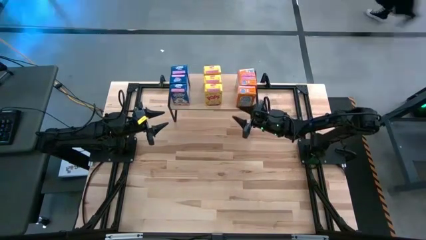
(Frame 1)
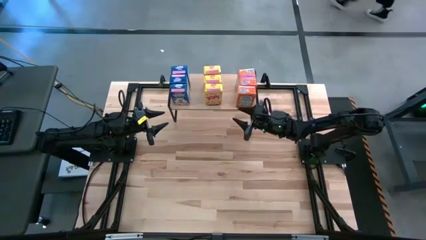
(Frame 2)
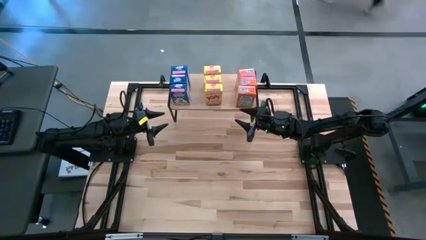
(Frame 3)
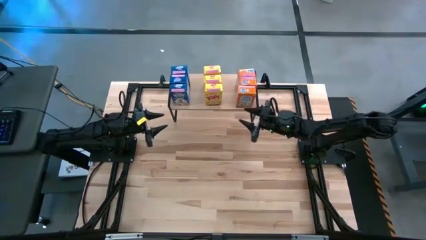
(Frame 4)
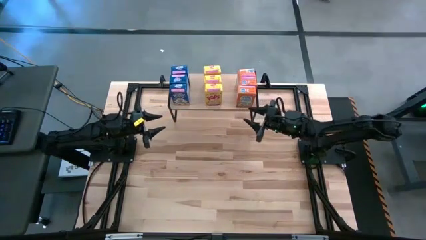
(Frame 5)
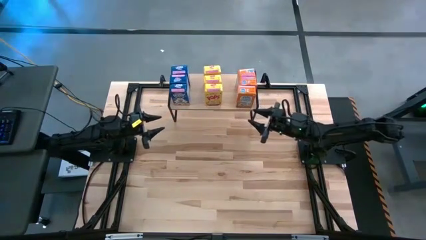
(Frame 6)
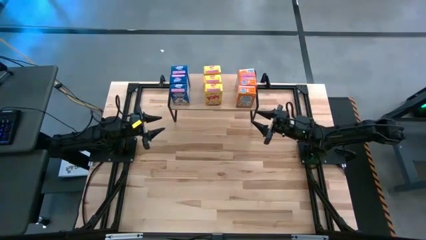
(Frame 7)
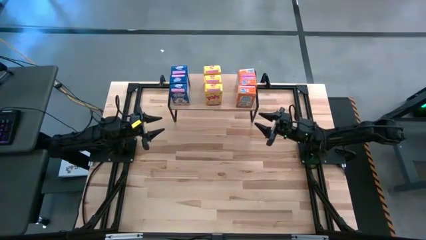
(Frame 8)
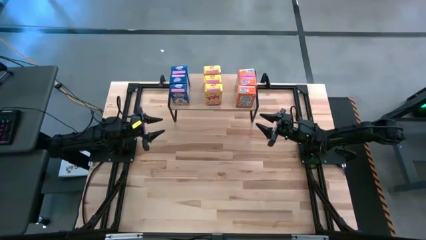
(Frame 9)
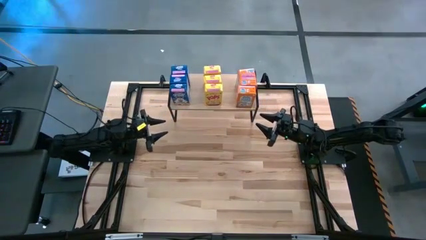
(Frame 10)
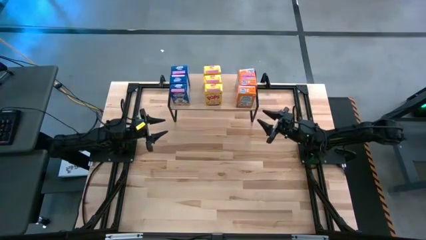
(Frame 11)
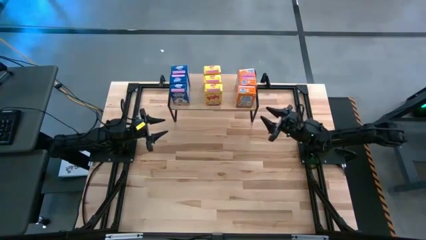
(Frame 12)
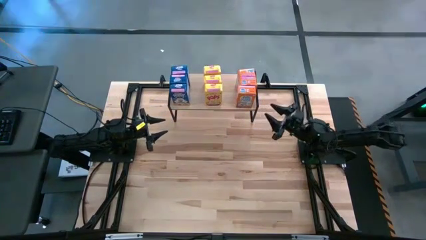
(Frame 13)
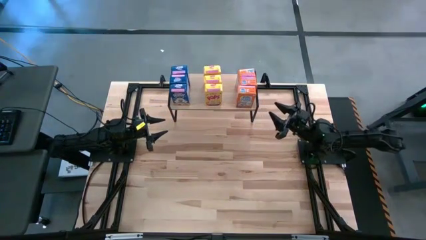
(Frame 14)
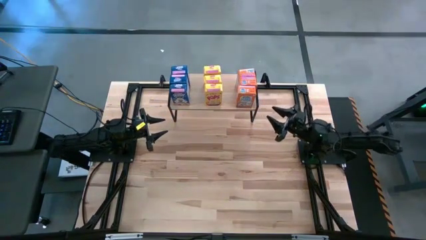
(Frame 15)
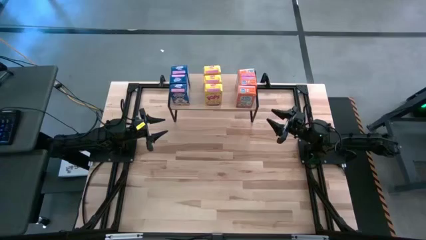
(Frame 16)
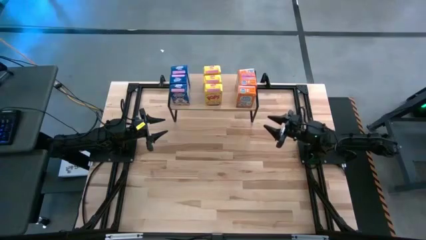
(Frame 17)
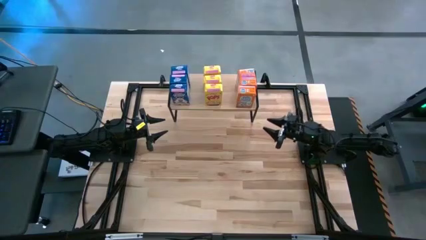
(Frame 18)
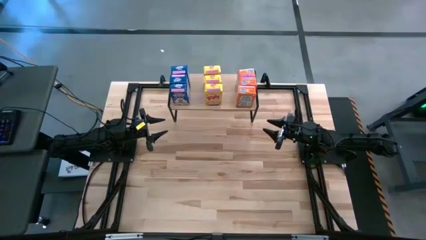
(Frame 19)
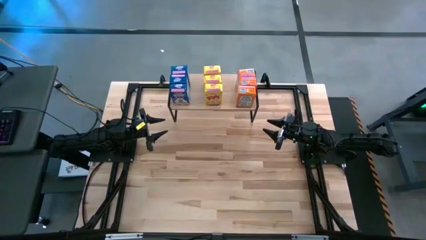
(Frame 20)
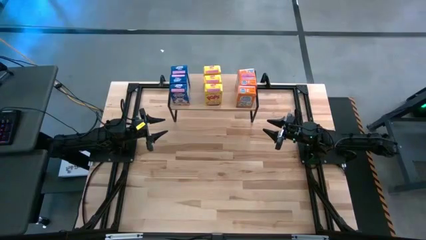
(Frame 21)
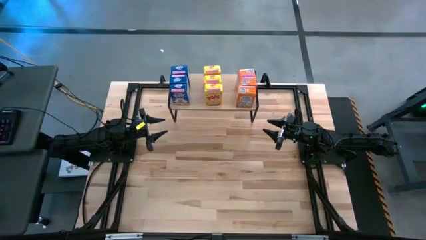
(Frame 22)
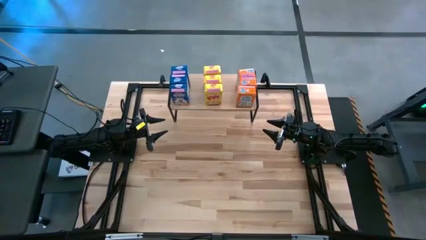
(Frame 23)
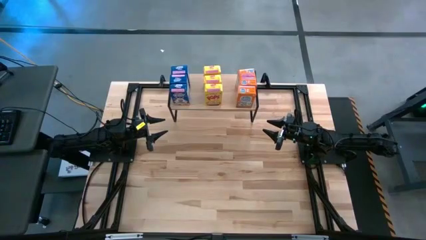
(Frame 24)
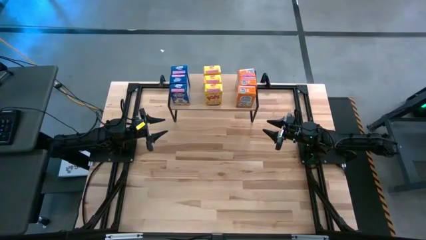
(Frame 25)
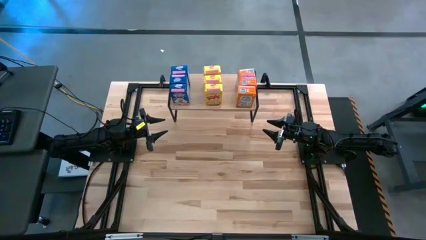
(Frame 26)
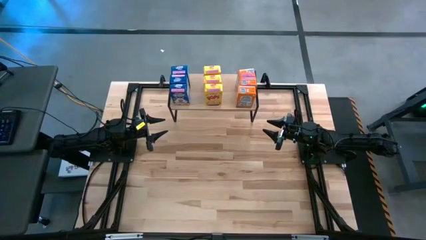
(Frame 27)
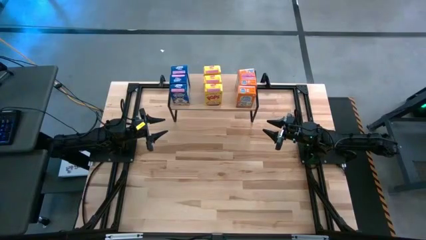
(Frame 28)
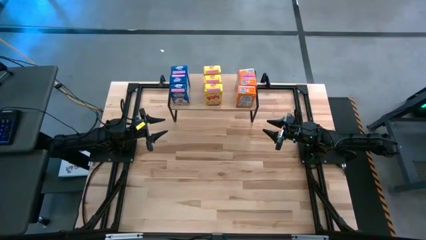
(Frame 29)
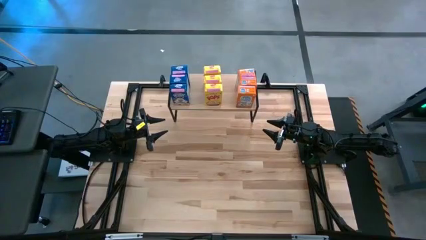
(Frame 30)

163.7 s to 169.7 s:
Task: Stack cereal on shelf
Return to Home Position

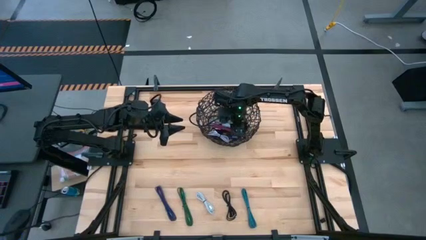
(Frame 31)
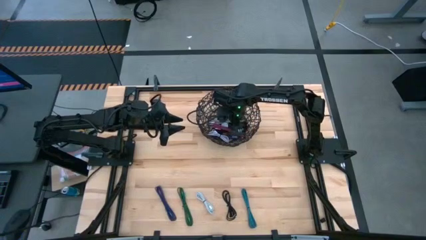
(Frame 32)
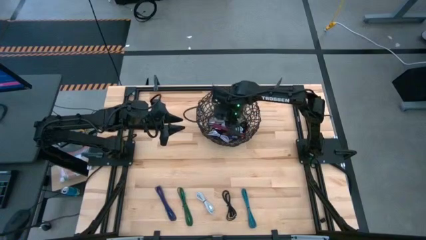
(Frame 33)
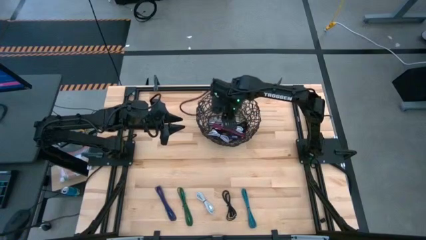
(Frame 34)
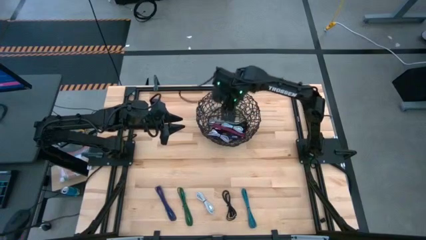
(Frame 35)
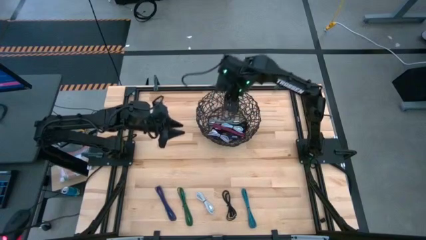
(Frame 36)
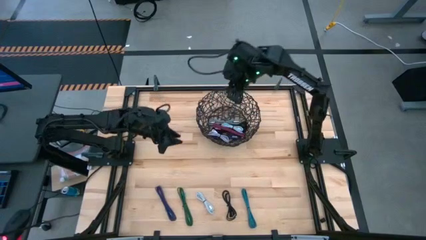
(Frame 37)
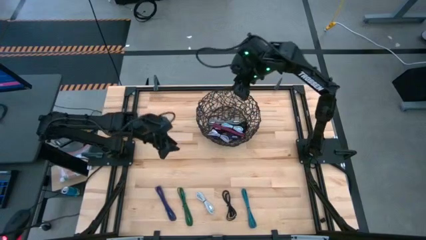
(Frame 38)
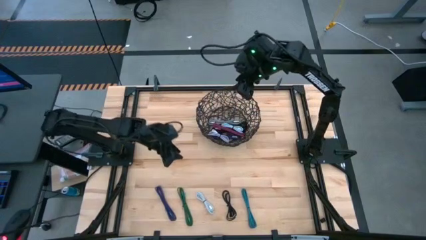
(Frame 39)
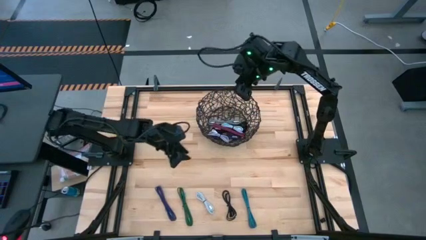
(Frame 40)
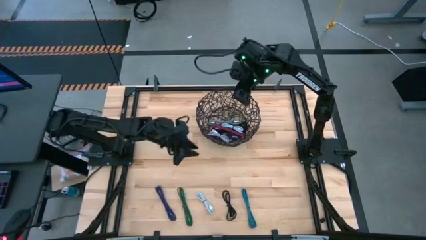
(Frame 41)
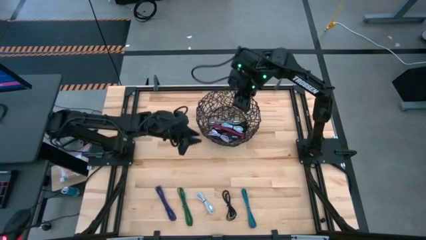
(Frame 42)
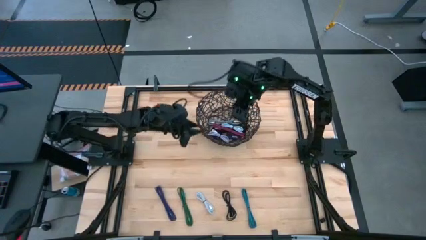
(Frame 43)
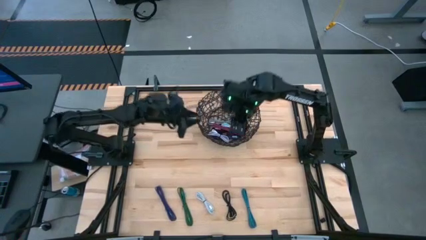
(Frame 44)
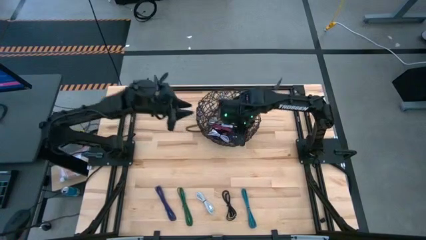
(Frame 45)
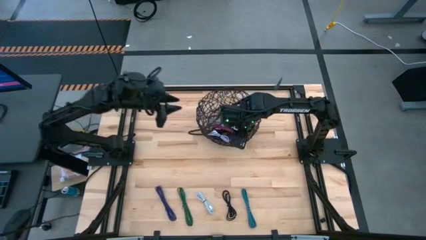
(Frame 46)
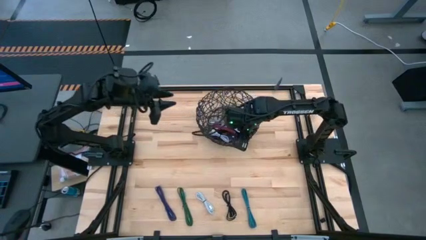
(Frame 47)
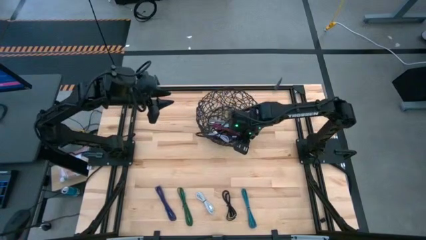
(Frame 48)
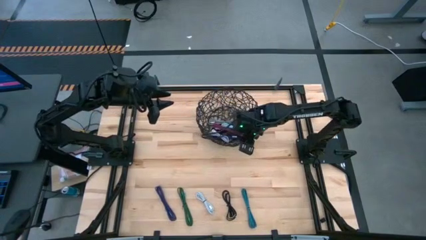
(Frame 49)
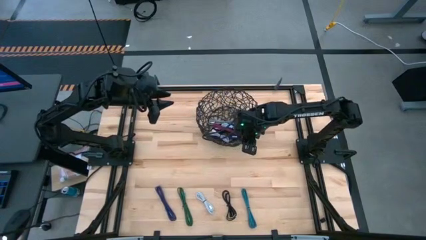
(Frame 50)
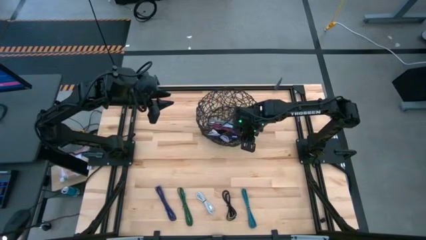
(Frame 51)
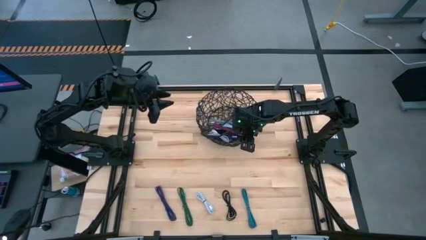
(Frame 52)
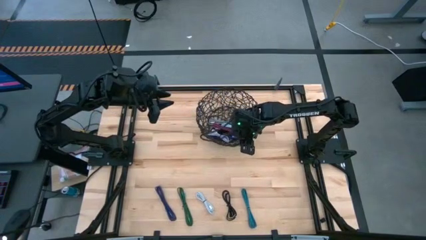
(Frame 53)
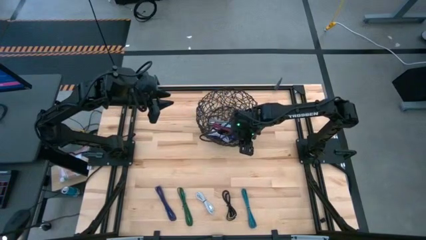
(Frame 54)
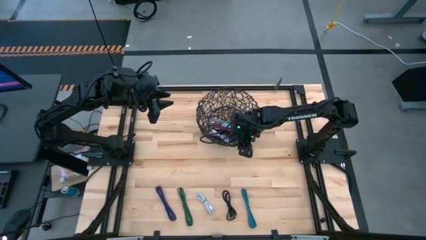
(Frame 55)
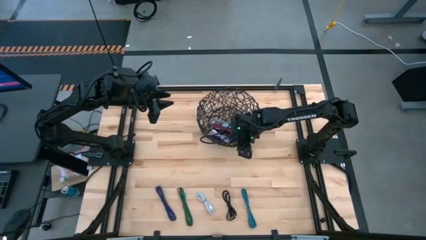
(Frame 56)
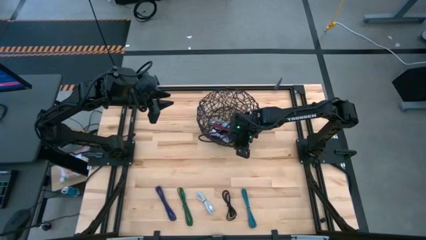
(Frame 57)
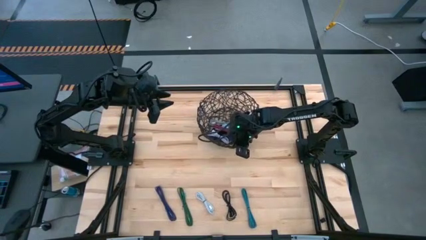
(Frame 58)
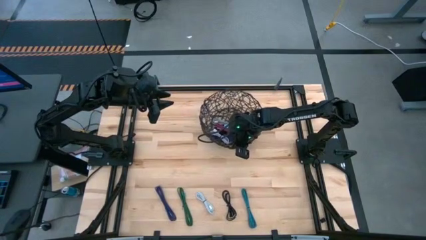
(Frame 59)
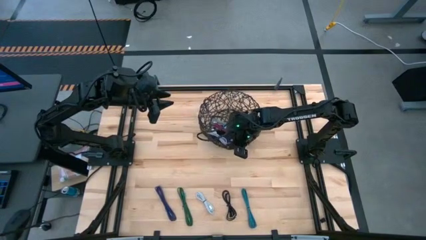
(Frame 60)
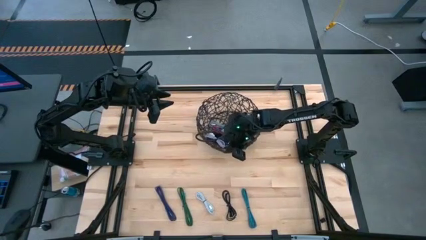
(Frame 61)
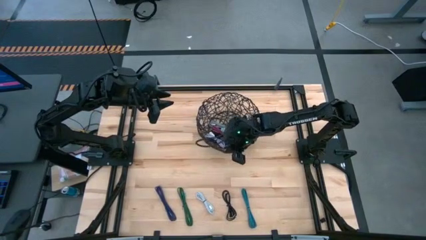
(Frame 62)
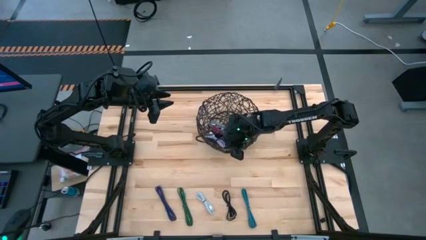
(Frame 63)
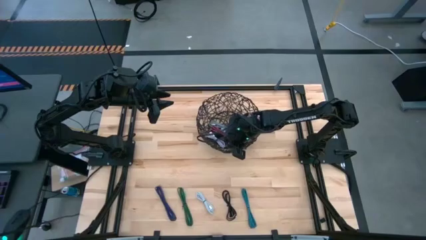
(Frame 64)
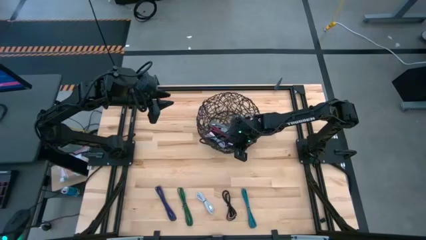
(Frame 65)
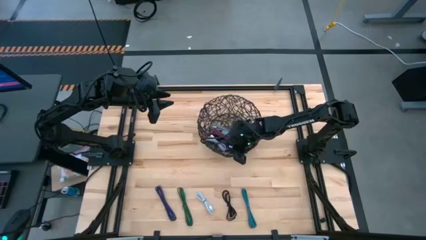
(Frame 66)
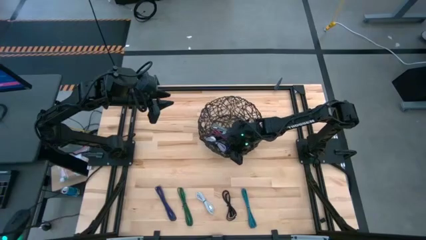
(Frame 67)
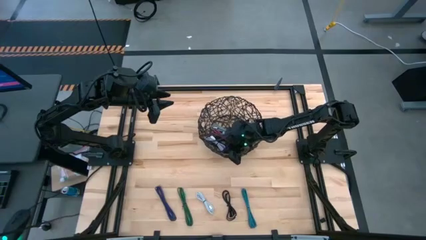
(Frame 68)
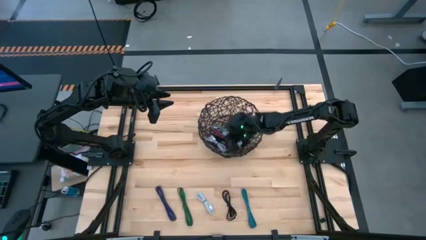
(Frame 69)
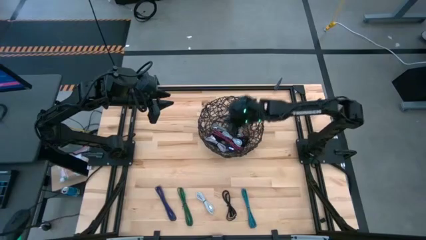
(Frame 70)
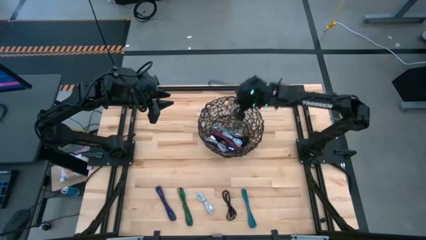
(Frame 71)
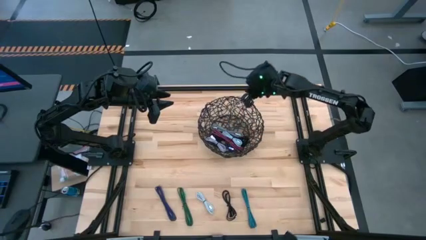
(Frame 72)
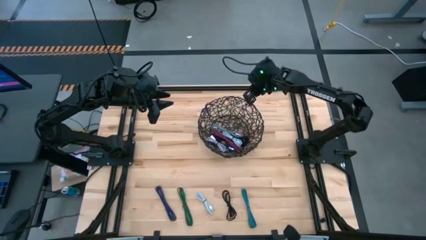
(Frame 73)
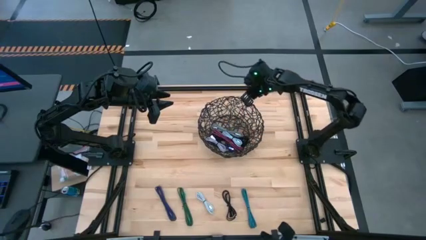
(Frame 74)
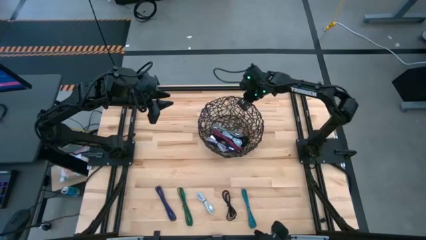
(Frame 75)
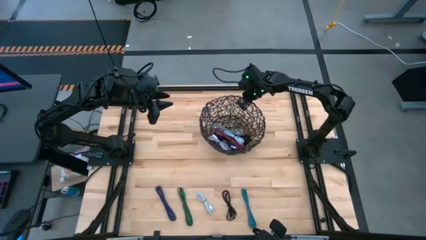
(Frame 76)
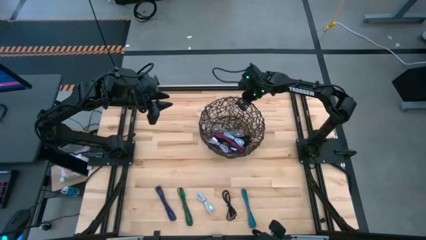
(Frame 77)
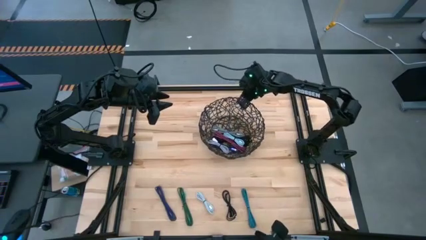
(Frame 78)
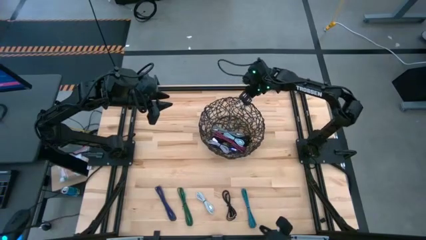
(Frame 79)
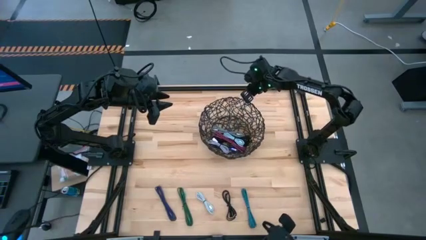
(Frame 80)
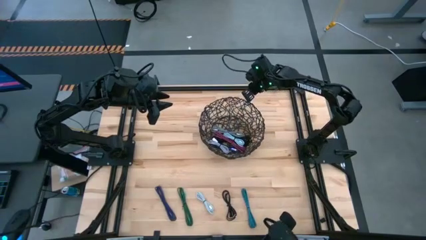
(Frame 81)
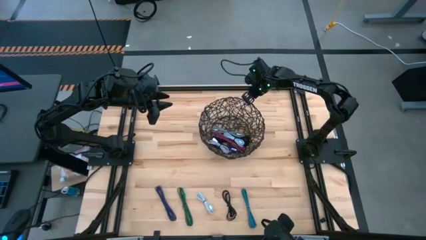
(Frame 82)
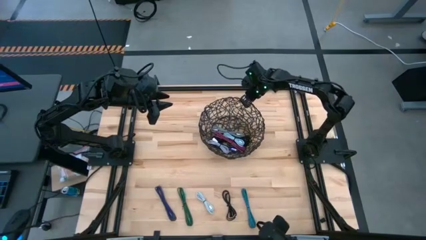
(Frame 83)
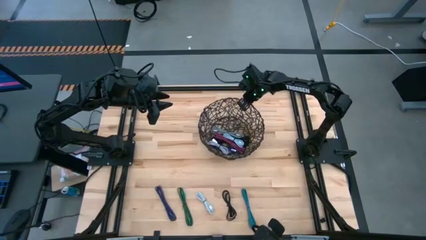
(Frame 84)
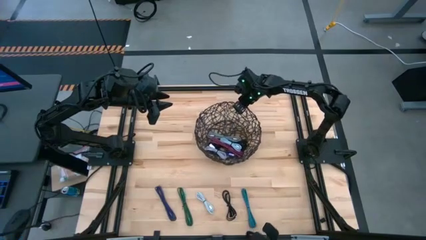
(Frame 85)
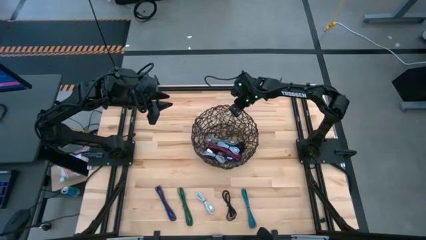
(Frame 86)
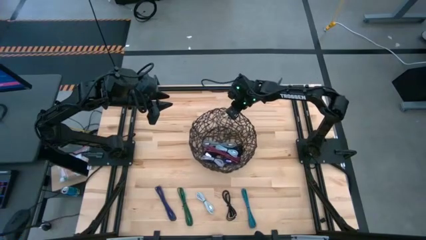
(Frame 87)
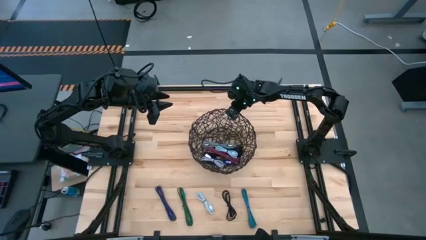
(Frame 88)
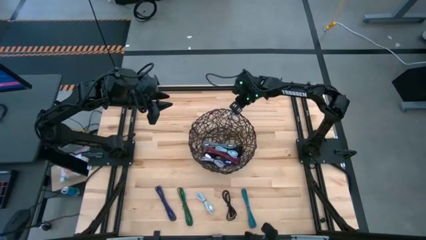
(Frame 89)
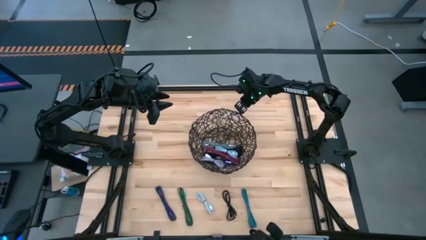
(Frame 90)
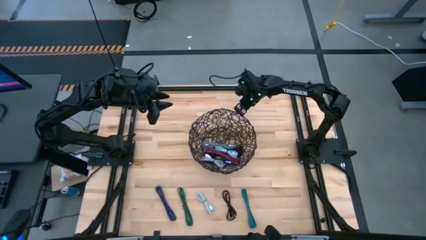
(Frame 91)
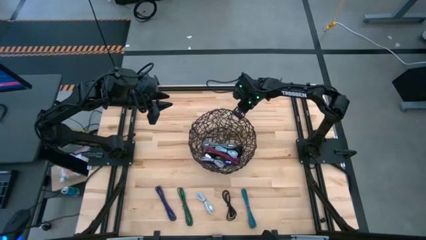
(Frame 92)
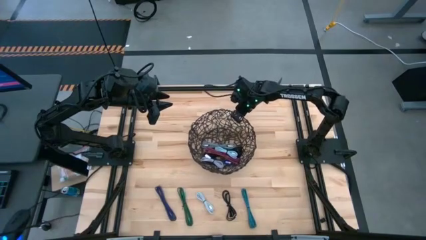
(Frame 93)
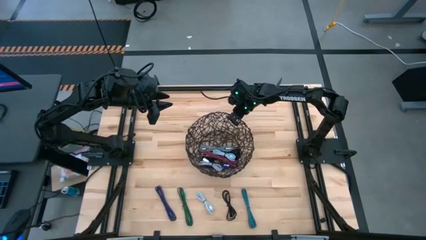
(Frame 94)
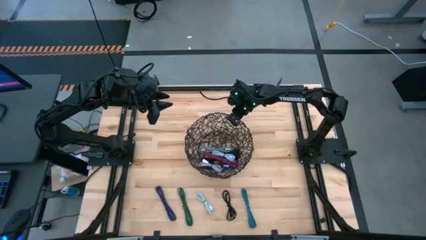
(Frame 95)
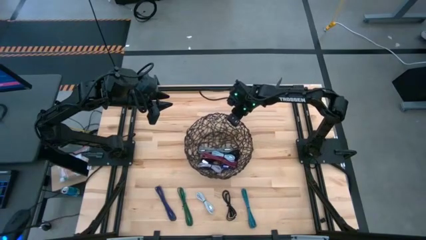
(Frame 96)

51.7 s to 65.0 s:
Task: Pick and place USB-C Cables
Adjust the black mesh basket
